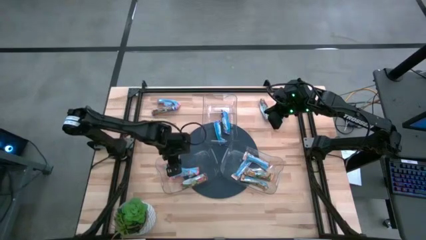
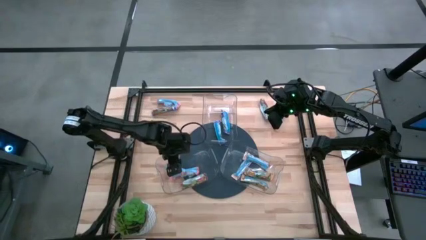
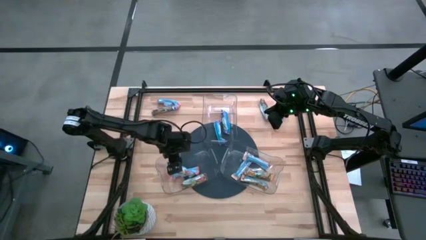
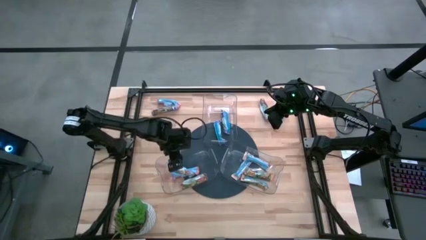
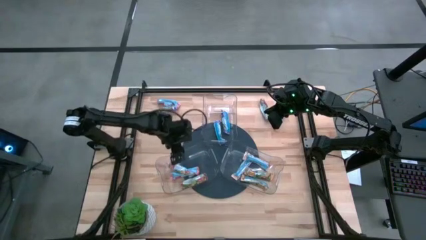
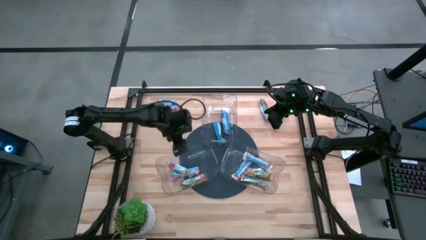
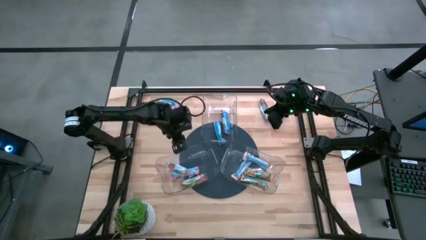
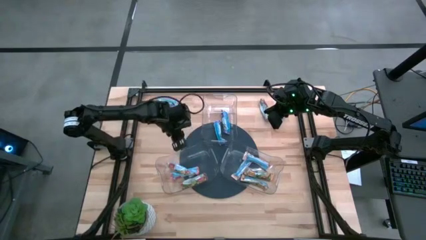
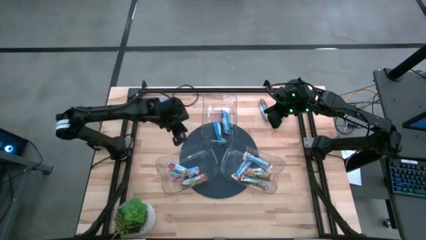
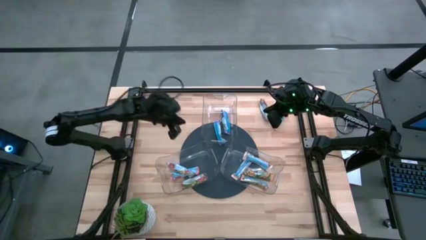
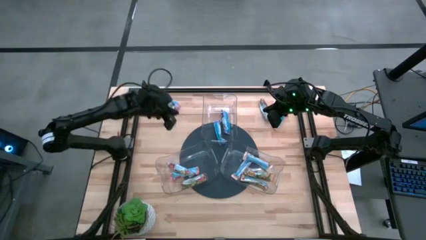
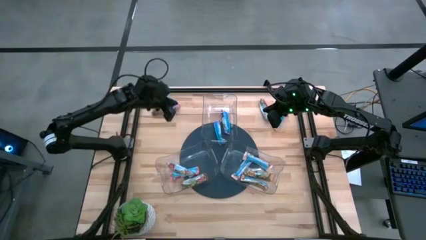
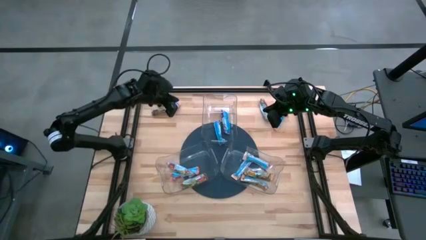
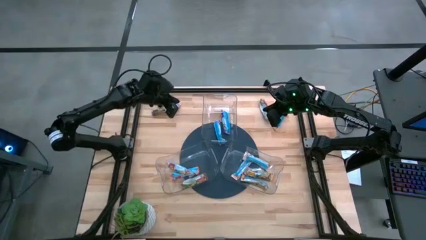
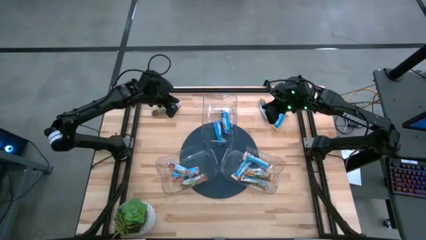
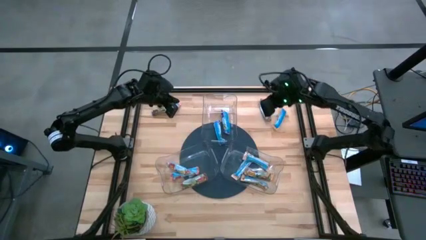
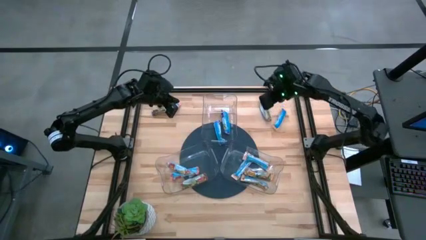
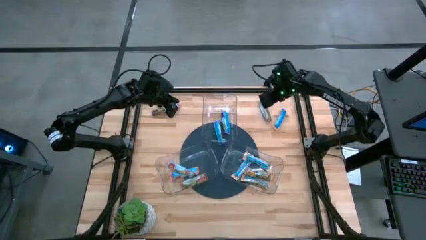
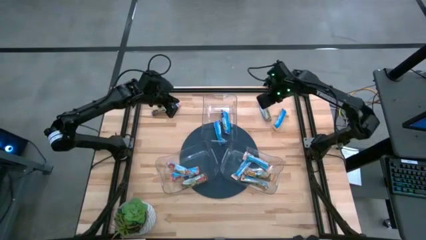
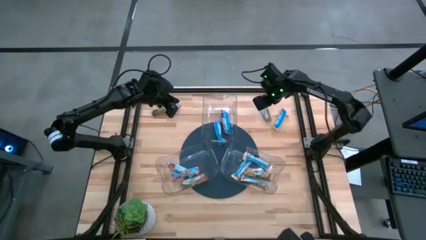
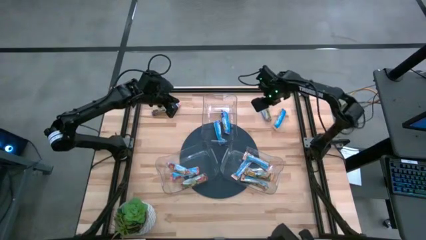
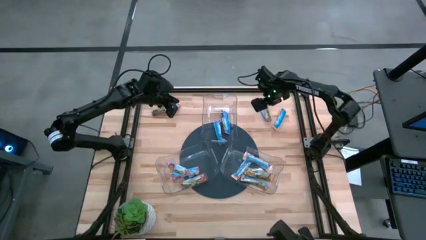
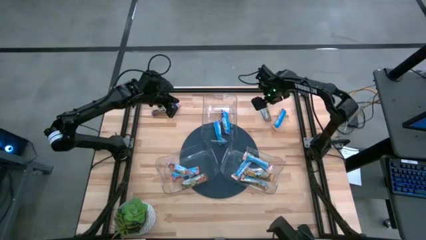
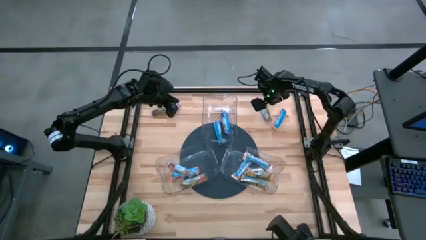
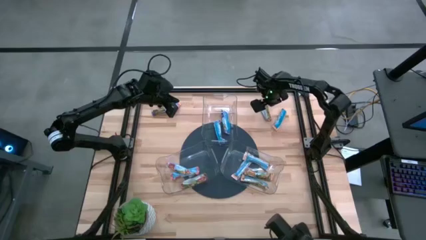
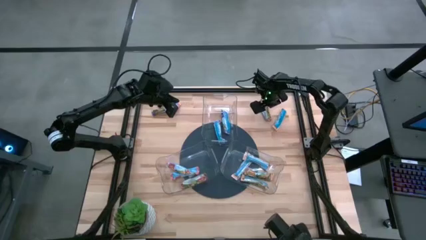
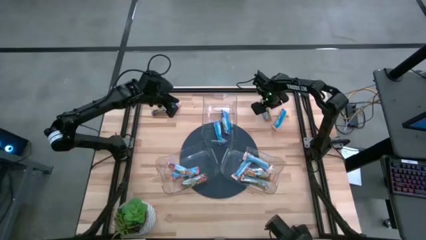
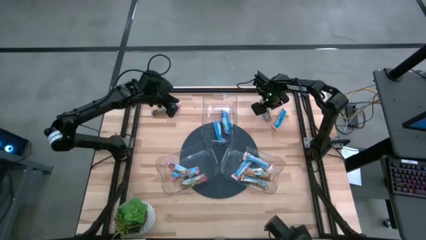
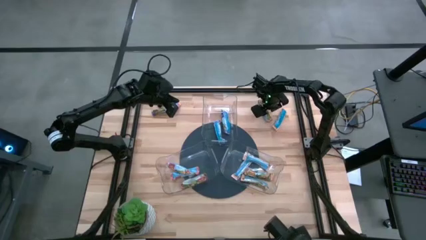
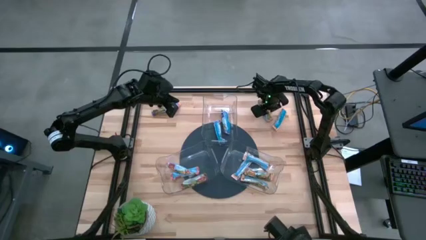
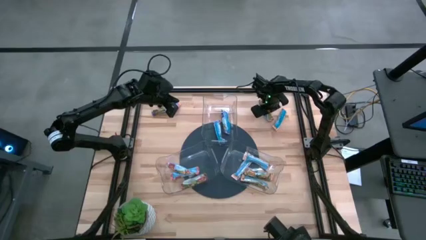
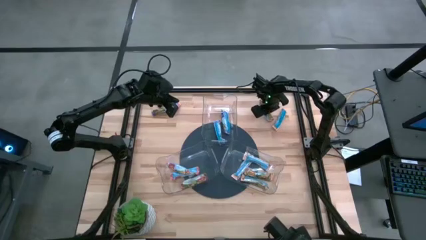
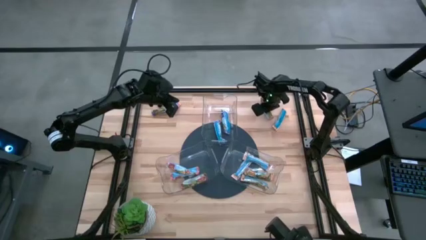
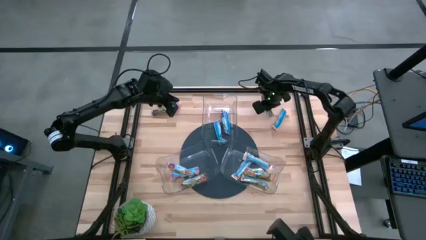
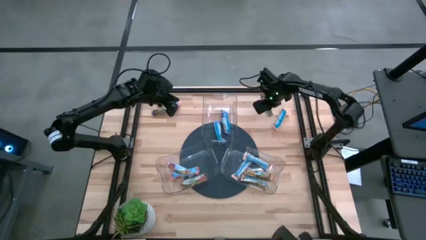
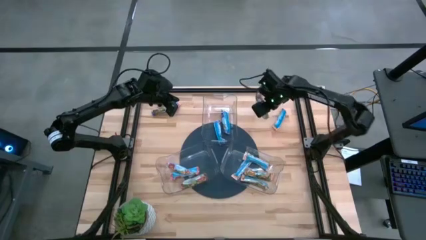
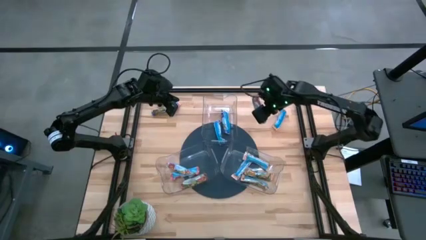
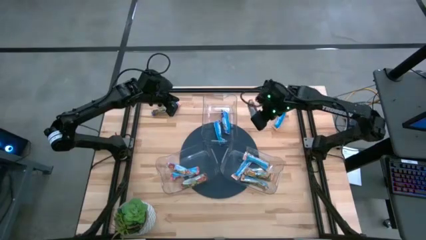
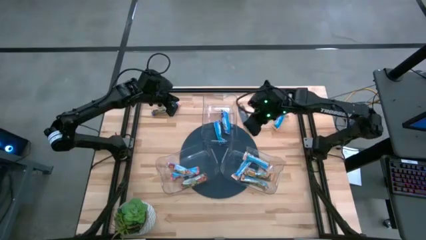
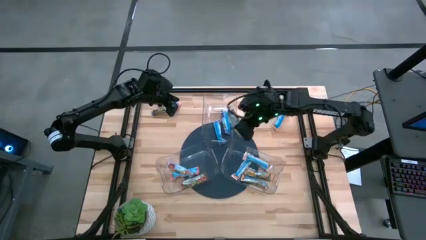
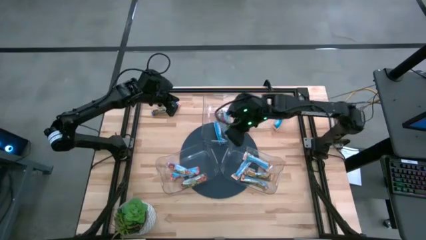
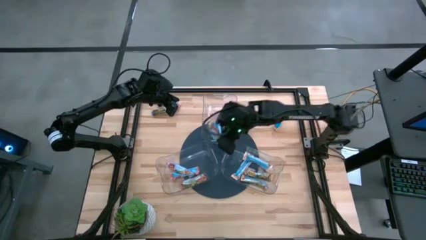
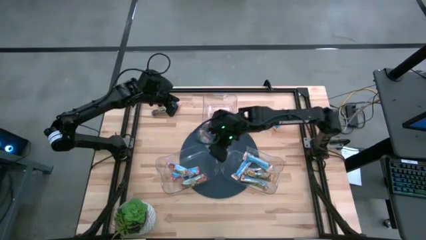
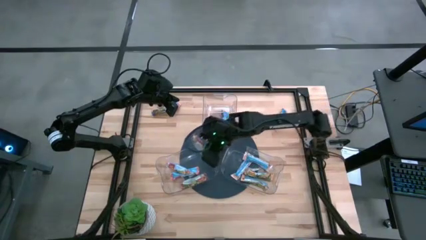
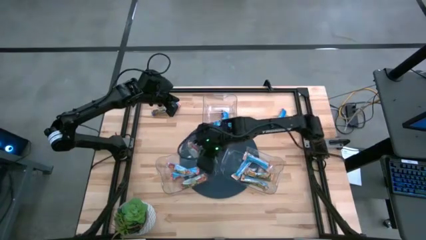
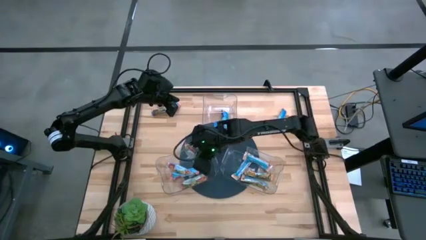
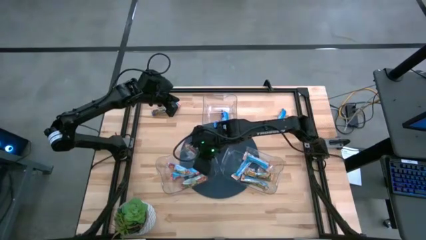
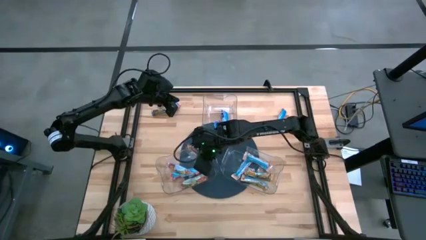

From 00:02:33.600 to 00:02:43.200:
Task: Pick and place Granola Bars by type
Put the red granola bar into the left transparent bin

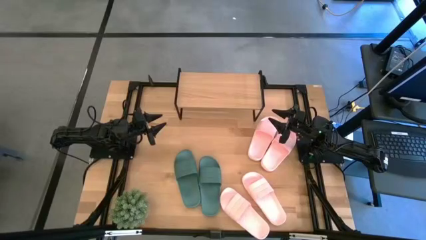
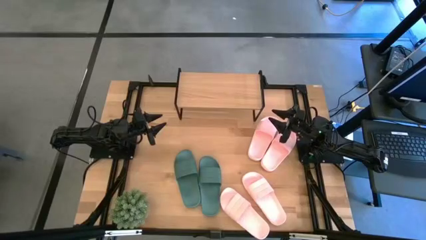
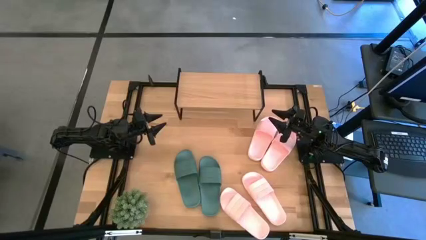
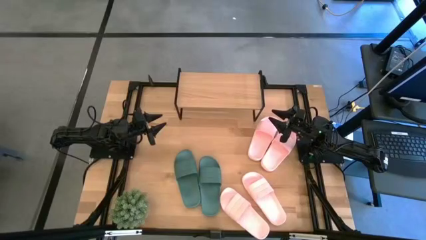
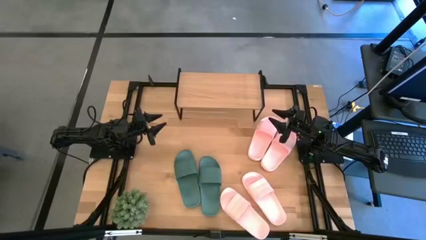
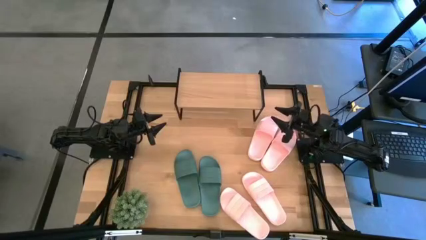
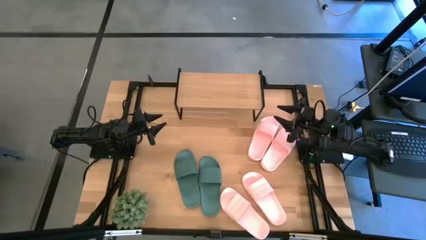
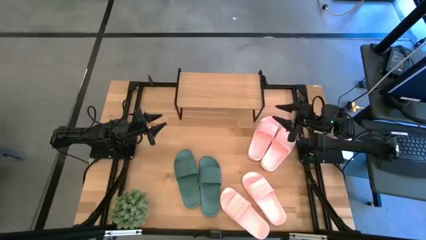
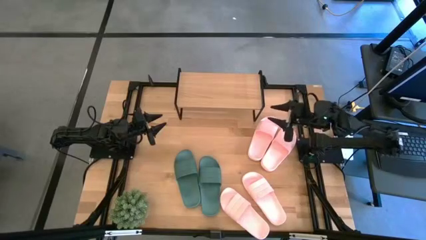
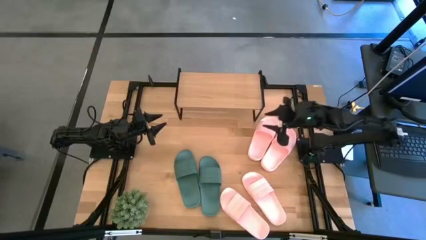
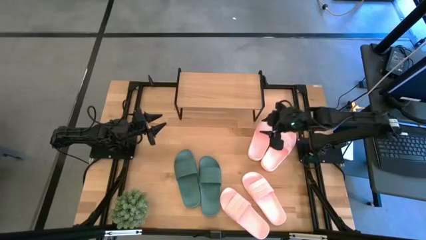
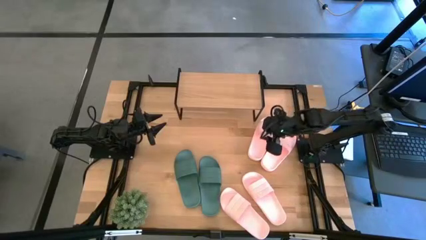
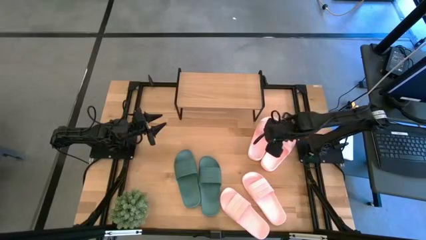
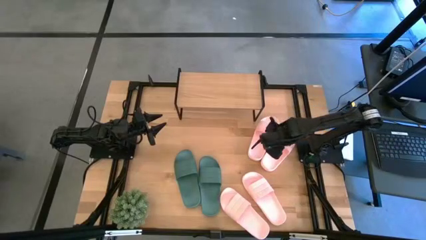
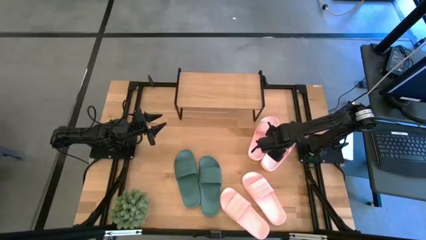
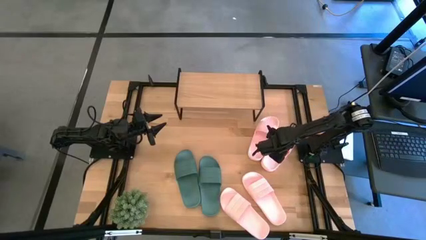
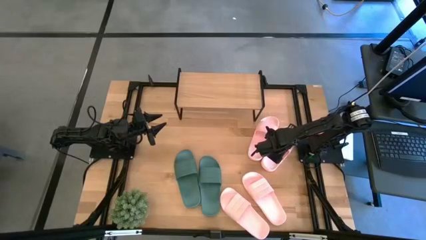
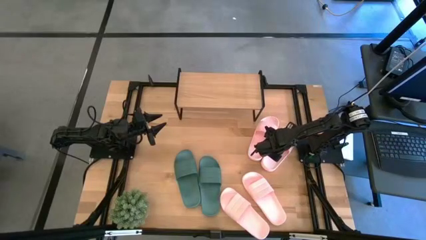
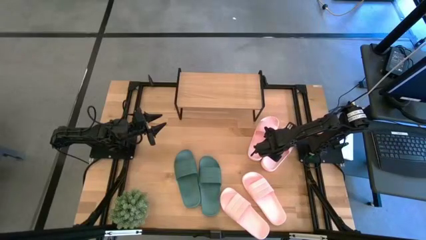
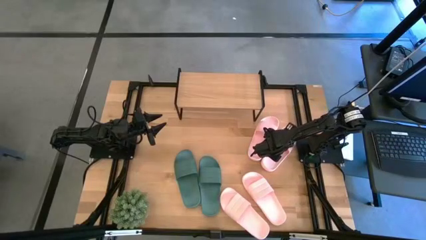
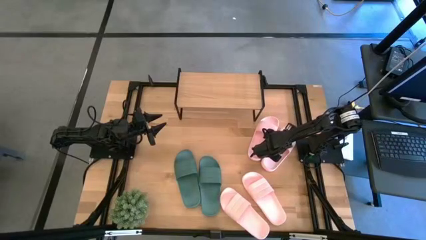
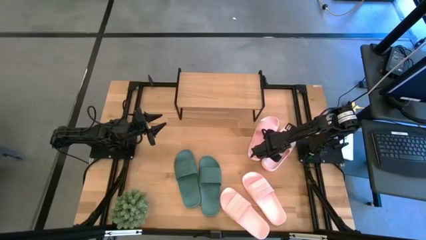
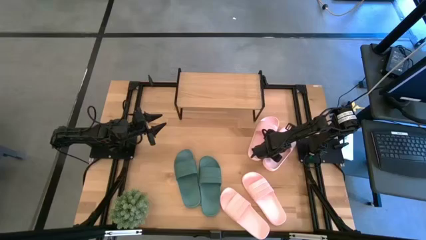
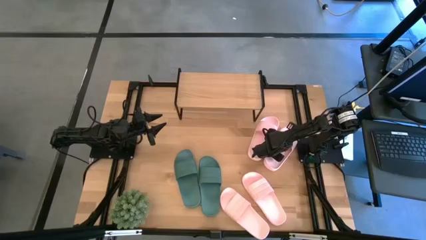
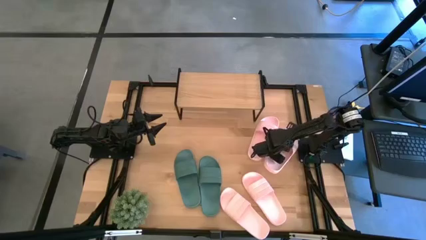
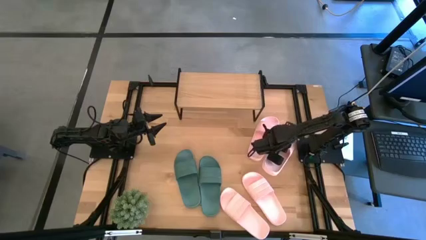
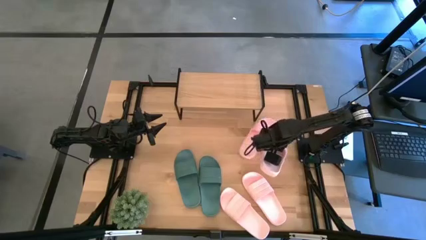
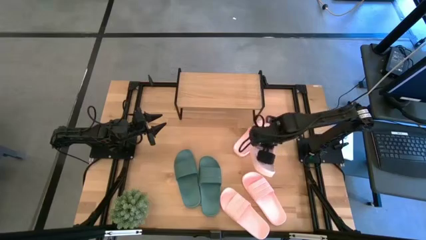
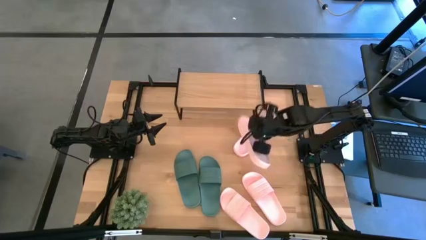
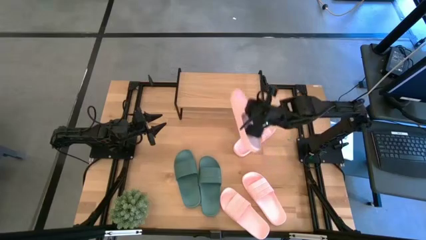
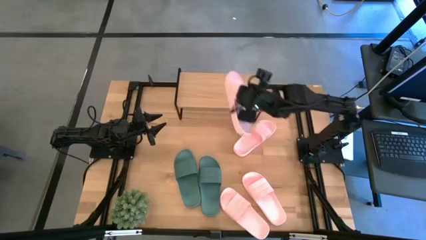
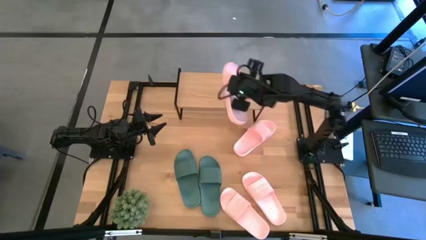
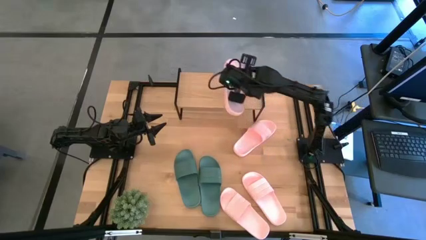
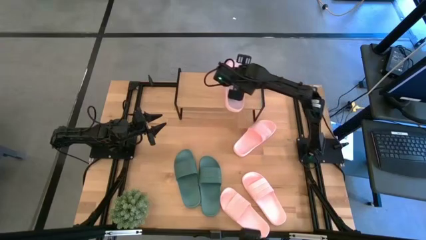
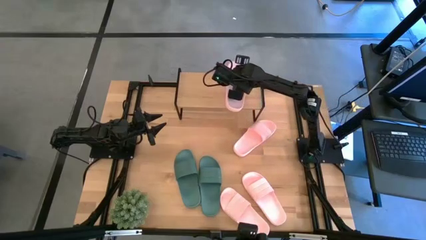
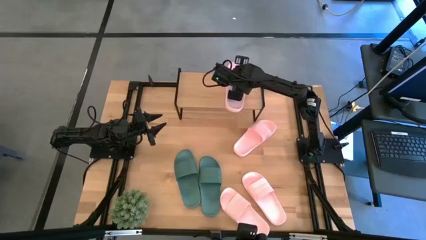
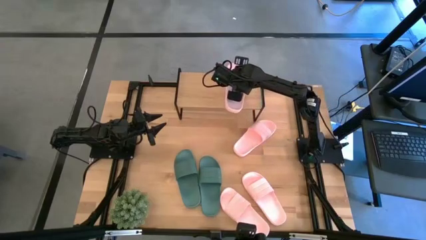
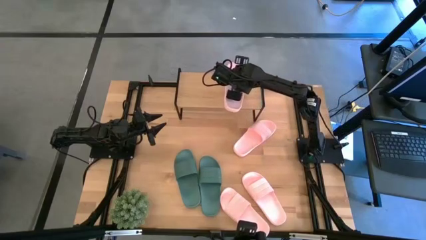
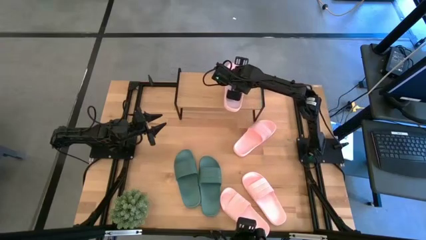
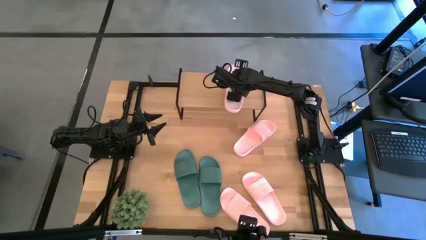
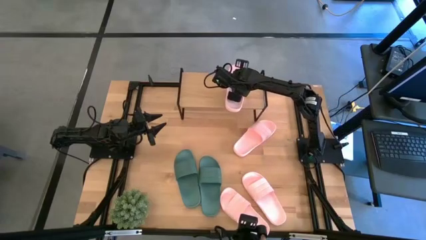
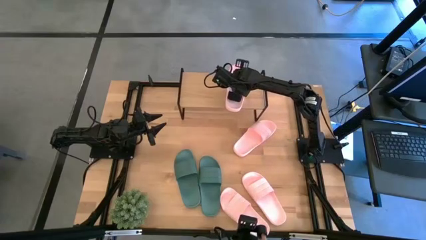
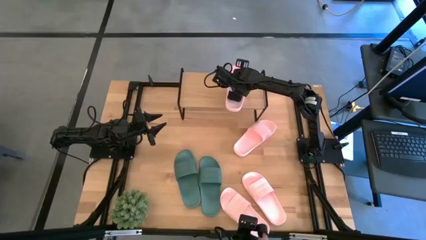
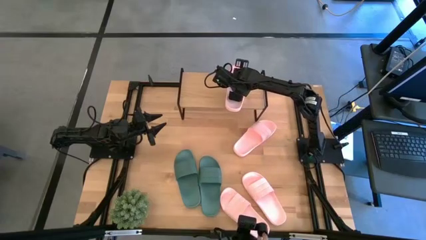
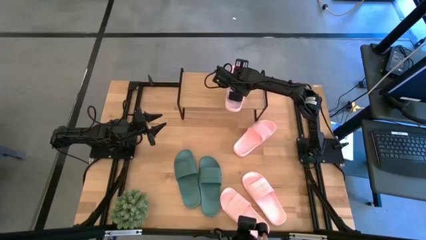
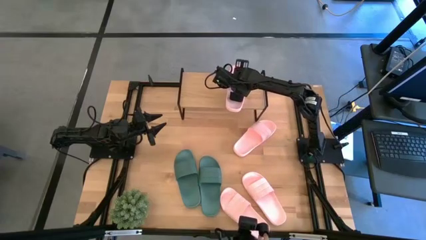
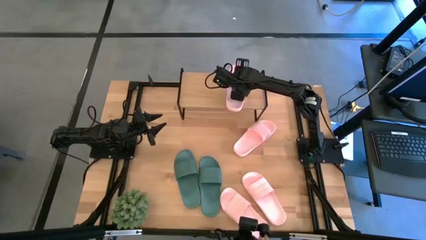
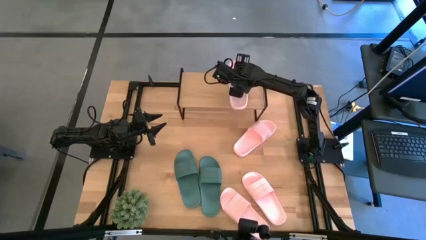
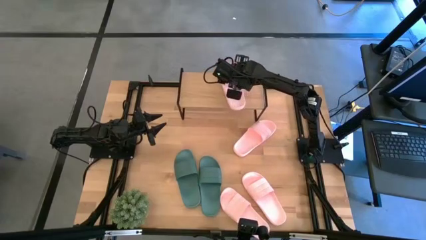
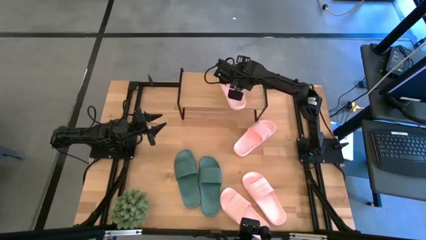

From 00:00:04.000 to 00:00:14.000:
Task: Pick and place slides into the shelf
Put the pink slide on the shelf
